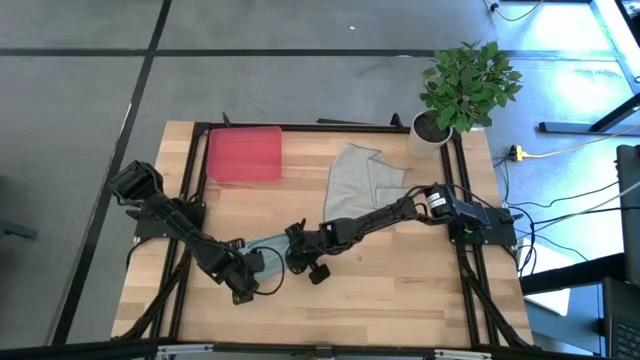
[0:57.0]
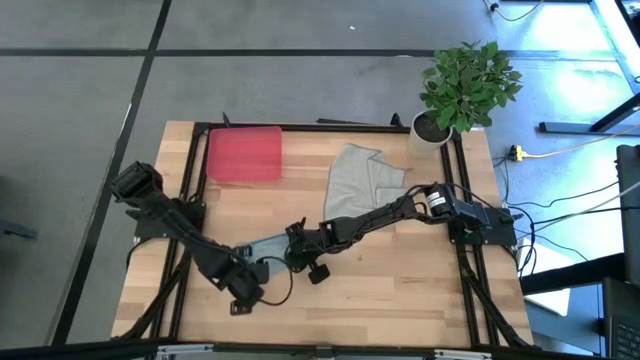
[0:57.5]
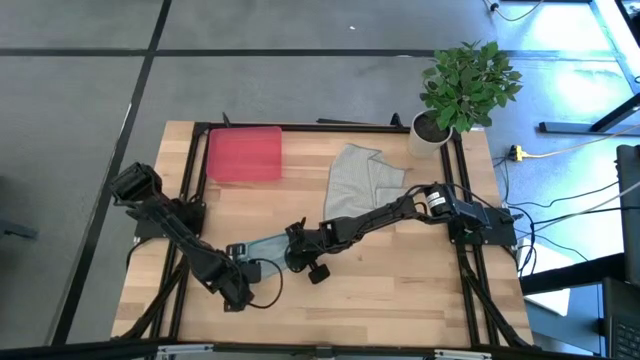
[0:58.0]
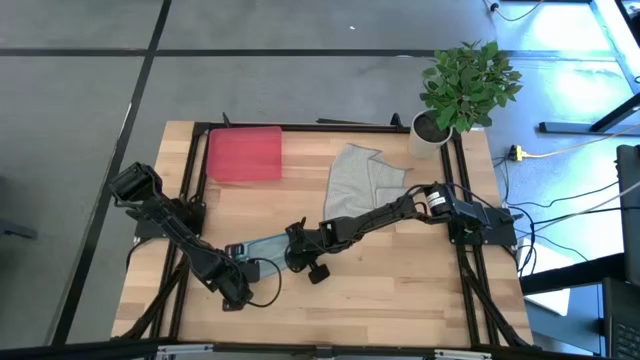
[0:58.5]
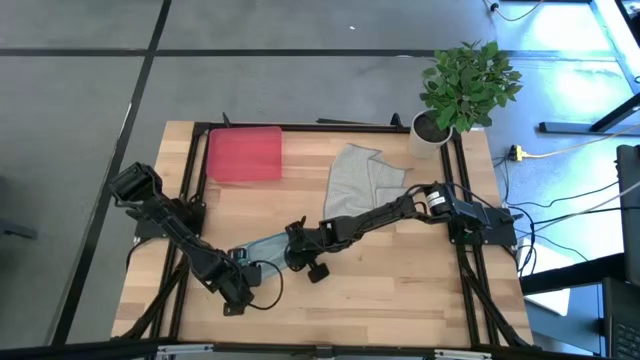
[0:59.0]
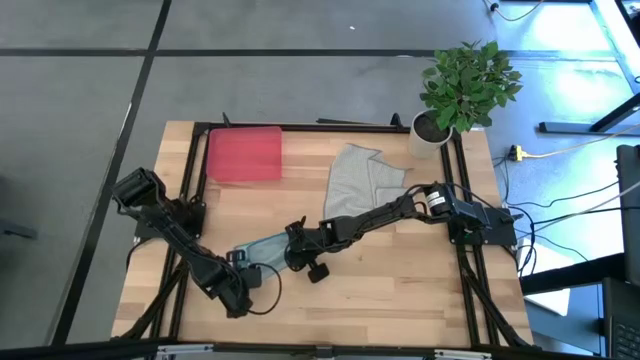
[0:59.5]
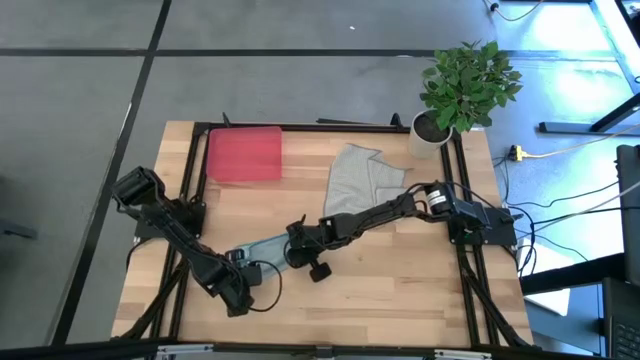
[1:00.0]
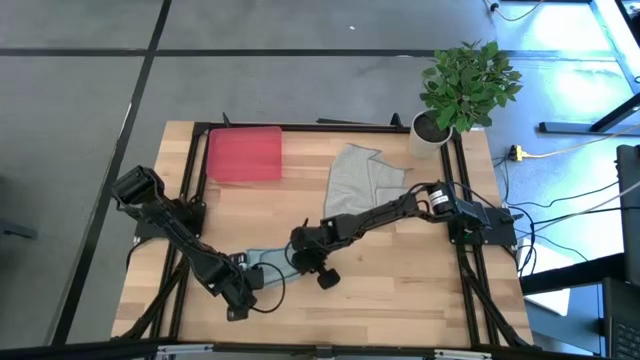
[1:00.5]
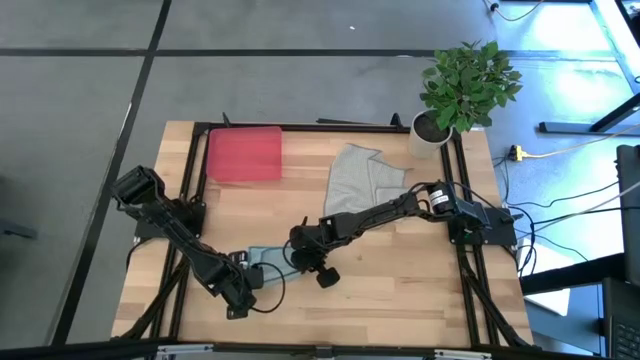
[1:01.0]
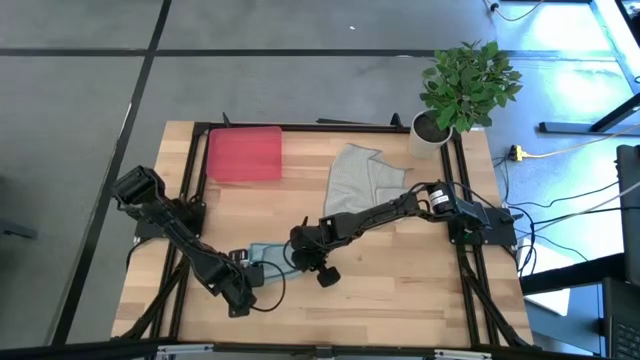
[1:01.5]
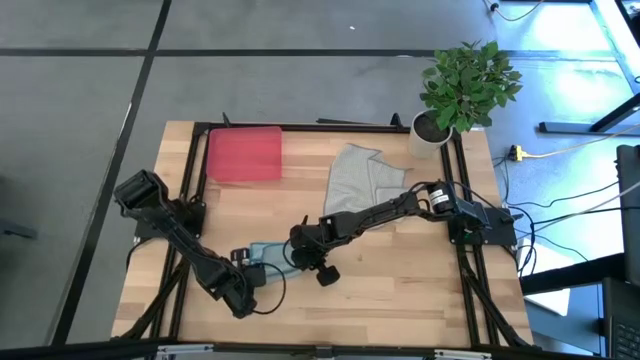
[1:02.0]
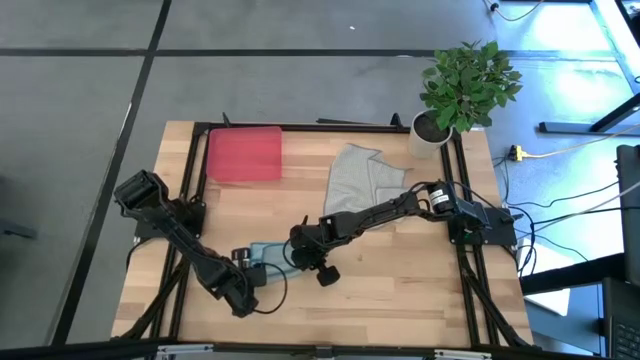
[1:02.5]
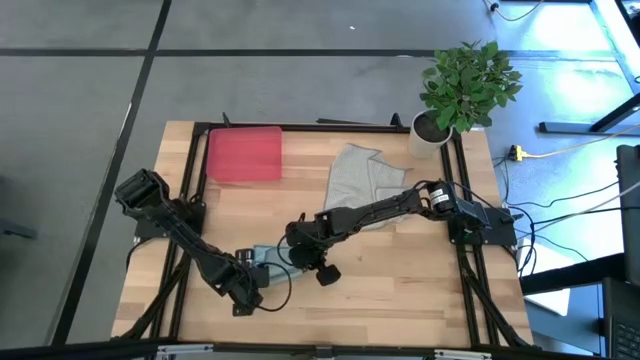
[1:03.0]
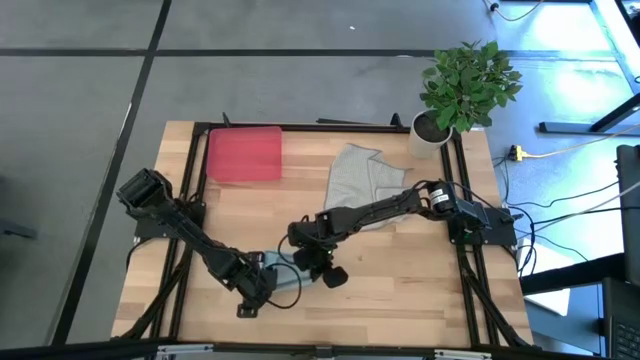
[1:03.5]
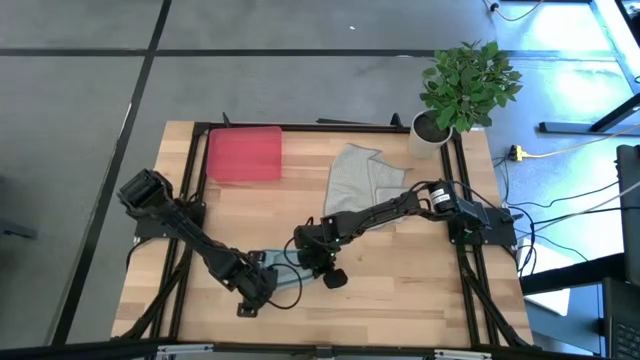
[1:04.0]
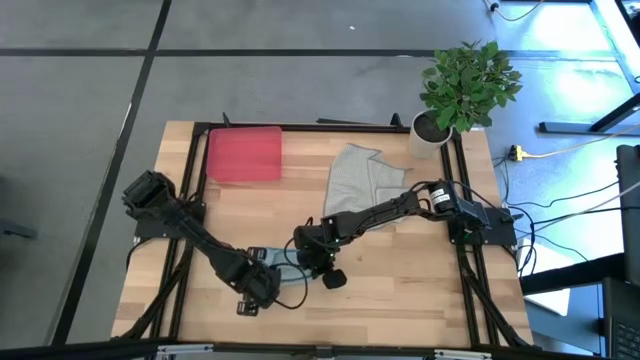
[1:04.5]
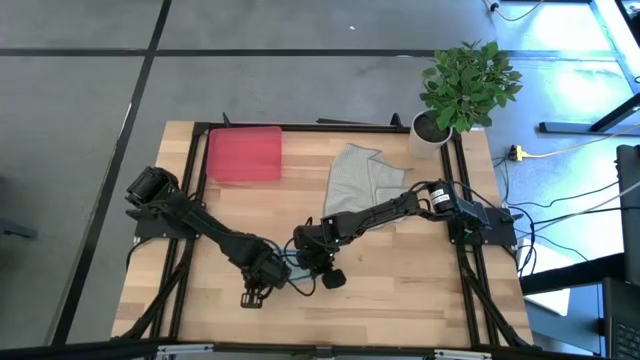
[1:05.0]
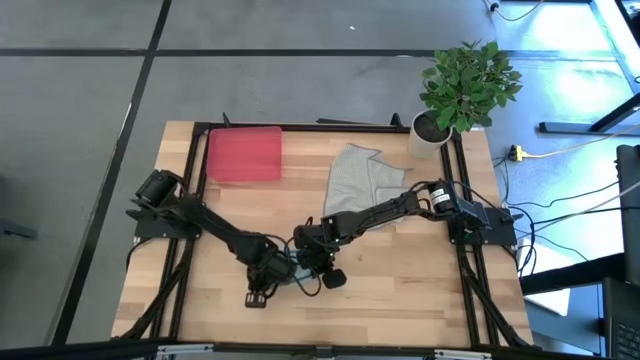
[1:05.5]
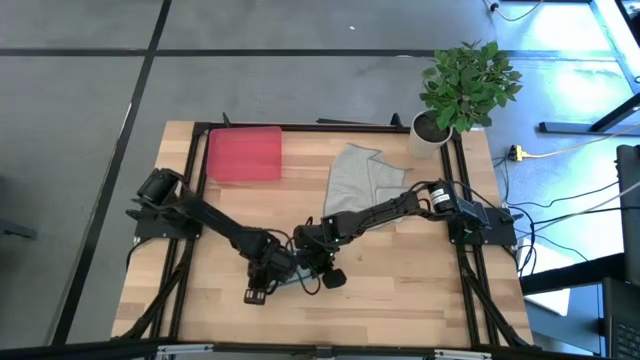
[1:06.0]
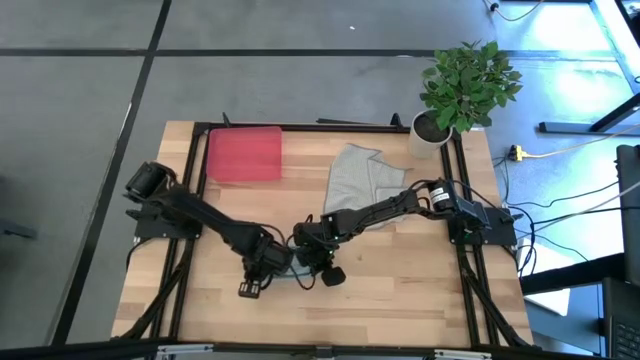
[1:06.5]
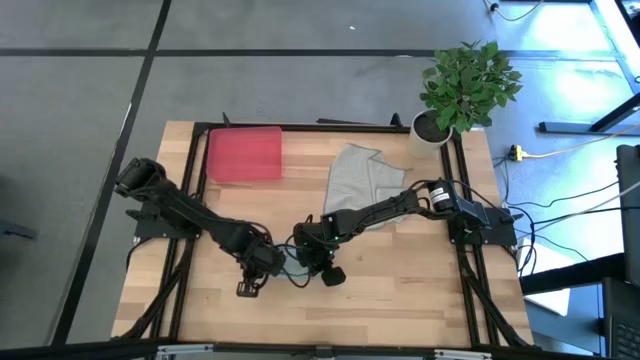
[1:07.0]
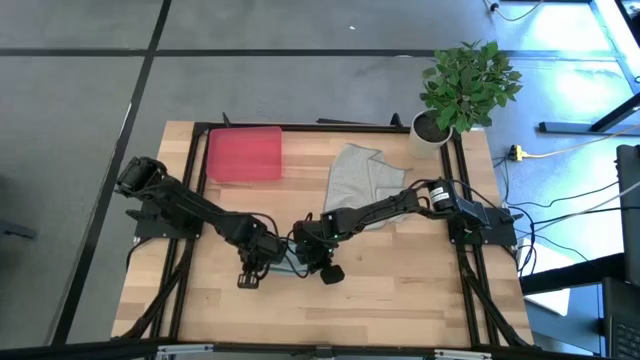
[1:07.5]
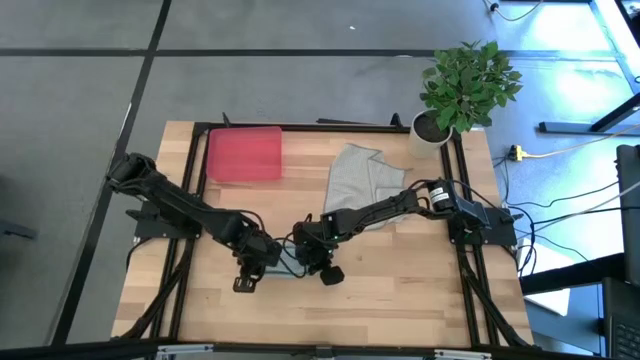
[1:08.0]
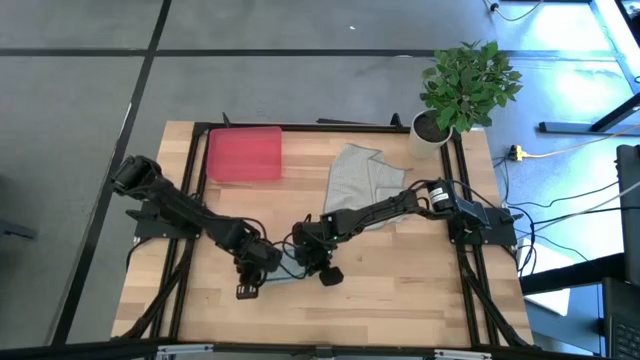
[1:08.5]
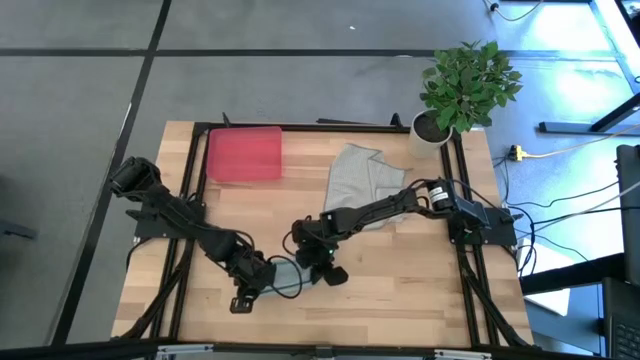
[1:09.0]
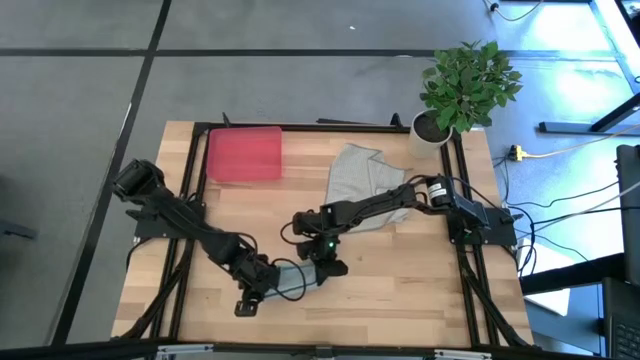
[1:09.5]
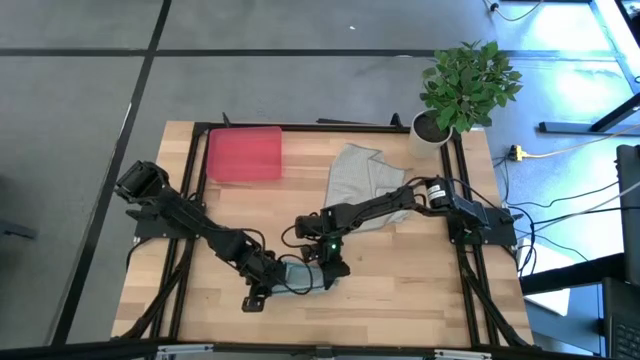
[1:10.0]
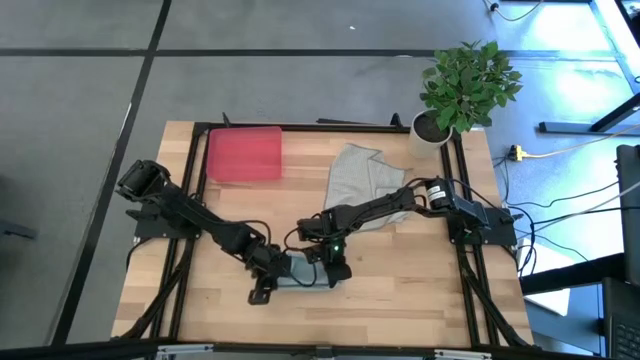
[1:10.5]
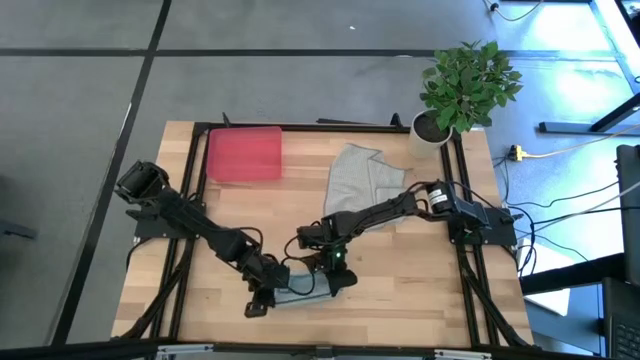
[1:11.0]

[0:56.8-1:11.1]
Task: Roll microfiber towels into tight, uniform cylinder then place into a basket
Roll the blue towel

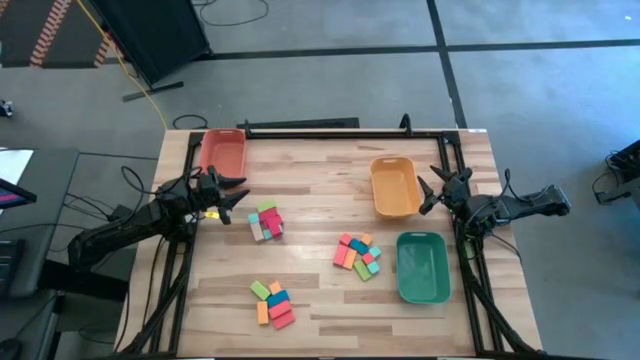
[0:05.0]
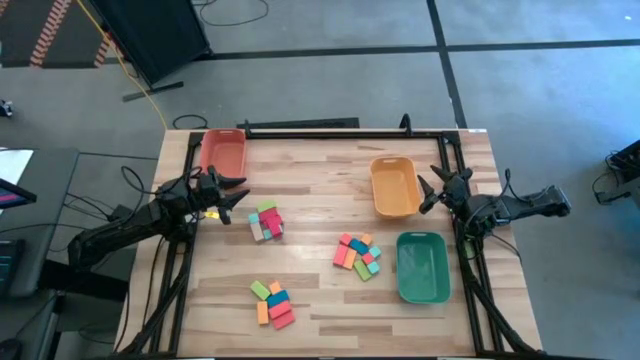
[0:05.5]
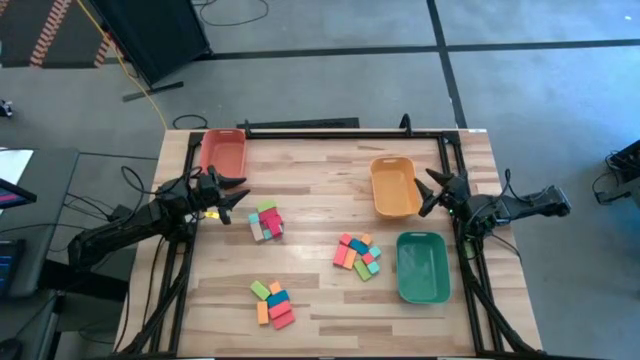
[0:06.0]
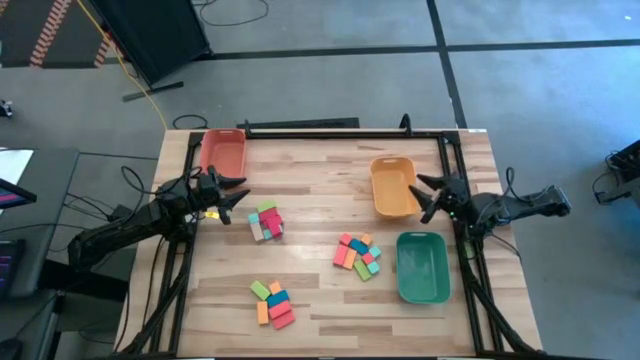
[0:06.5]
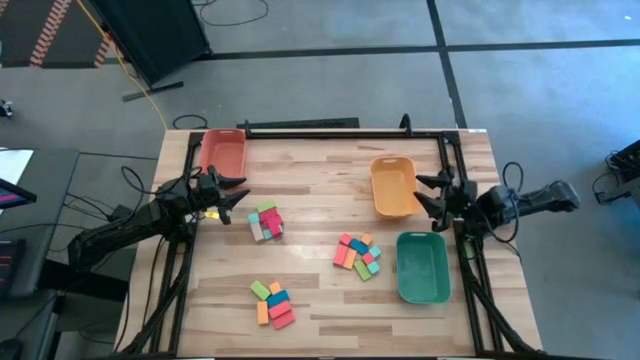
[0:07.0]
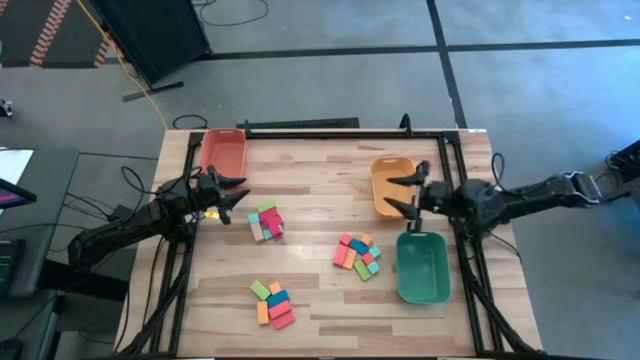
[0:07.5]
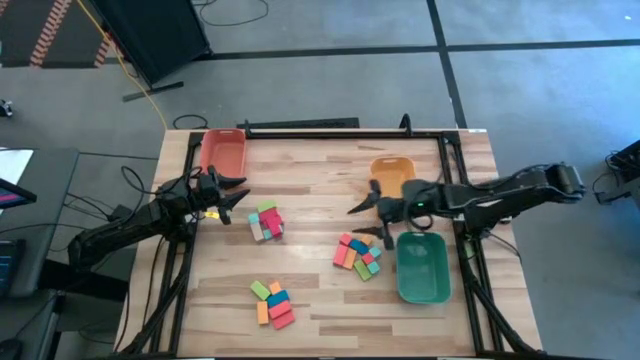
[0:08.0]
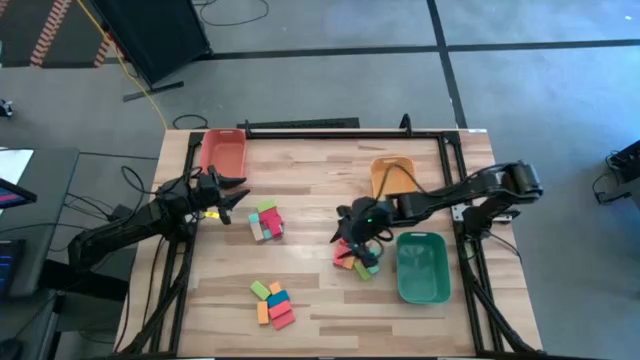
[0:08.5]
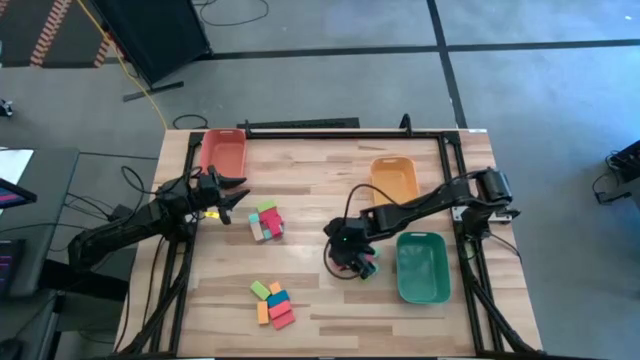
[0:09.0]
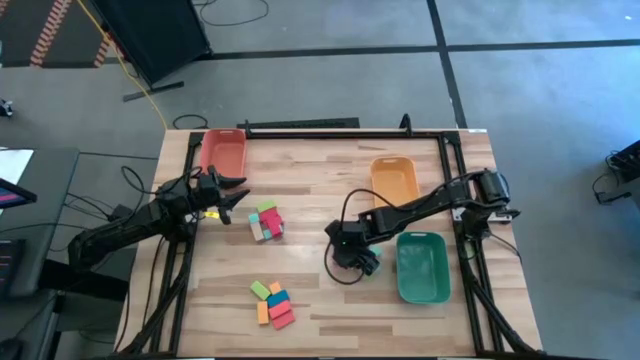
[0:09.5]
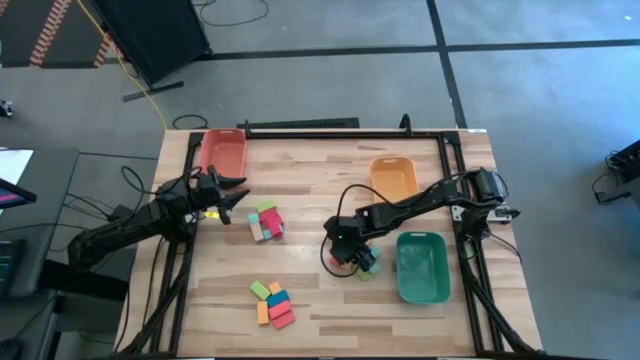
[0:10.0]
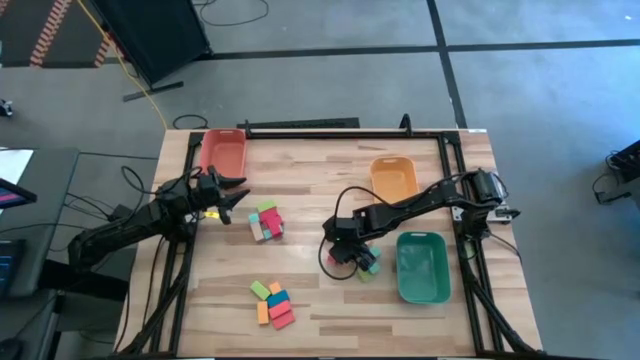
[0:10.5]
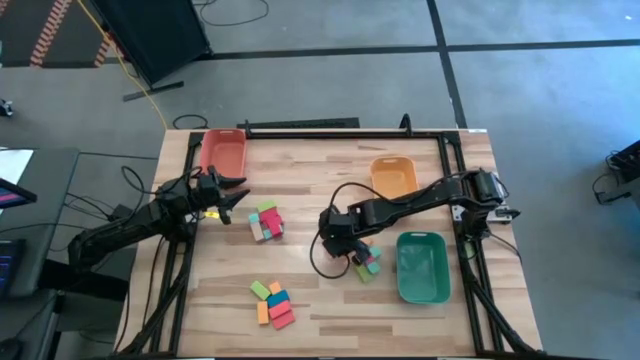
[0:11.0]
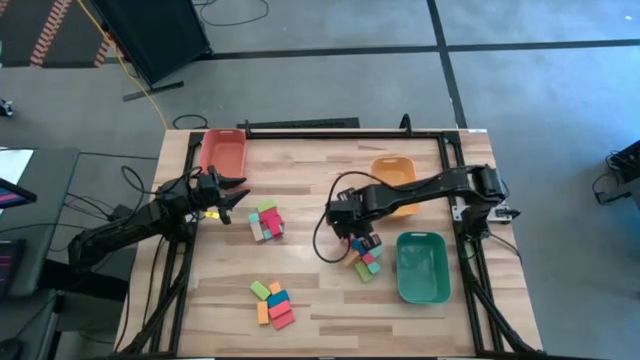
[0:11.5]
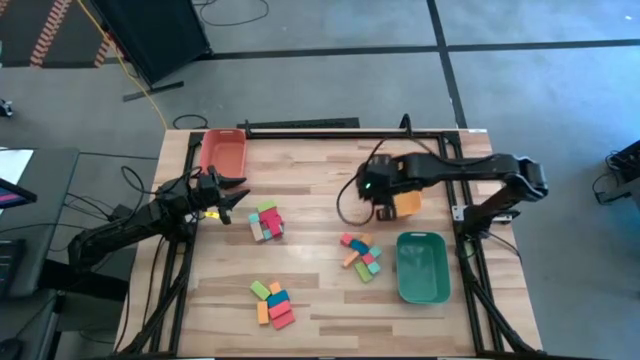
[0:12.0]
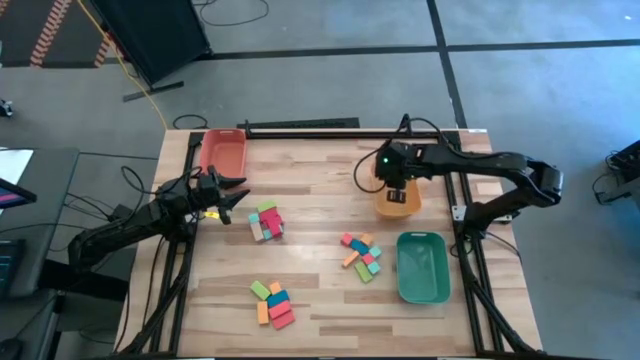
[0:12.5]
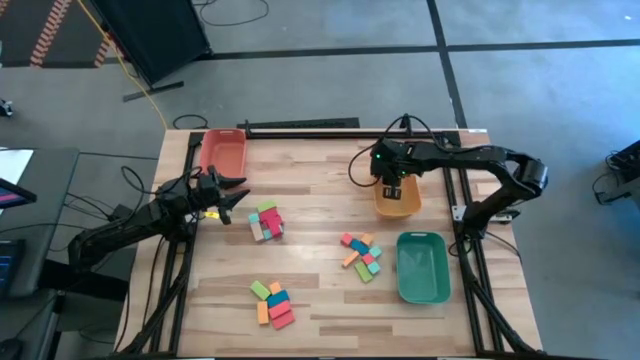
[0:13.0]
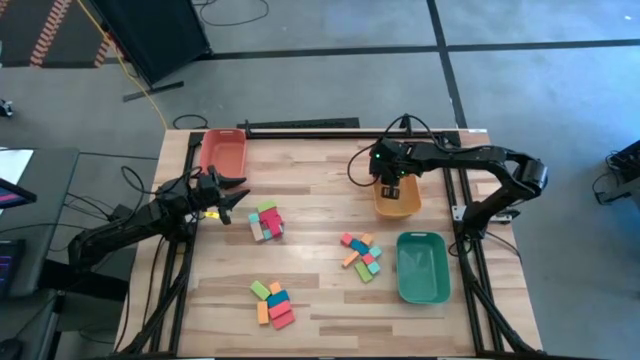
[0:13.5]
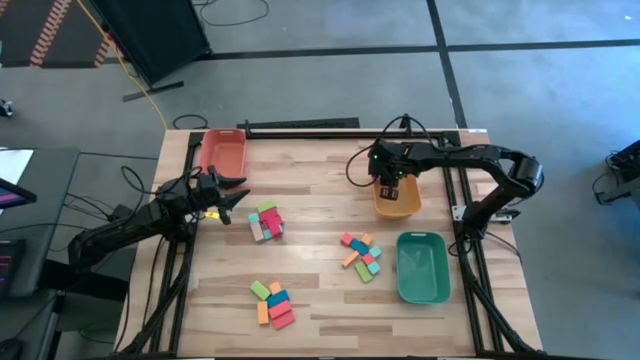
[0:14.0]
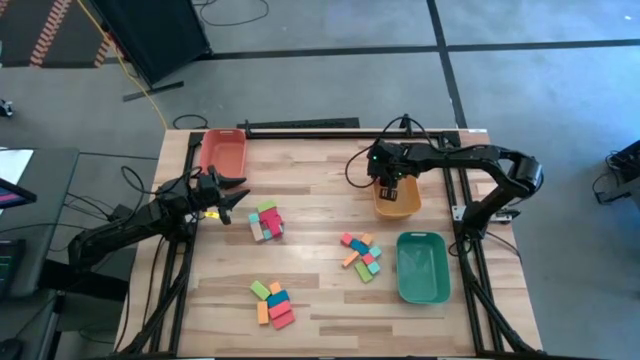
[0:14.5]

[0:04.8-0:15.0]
Task: Sort blocks by size
Put the top large rectangular orange block into the yellow bin
